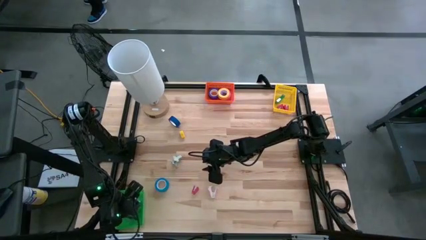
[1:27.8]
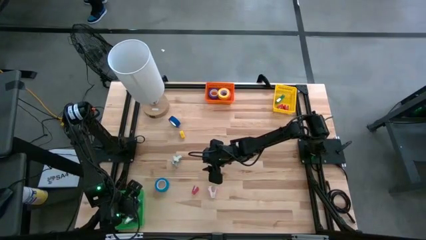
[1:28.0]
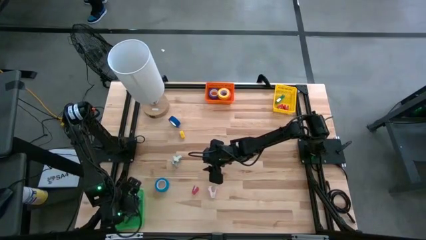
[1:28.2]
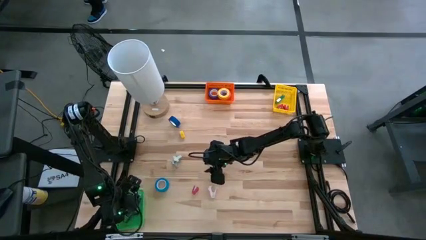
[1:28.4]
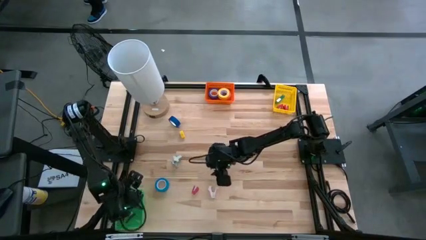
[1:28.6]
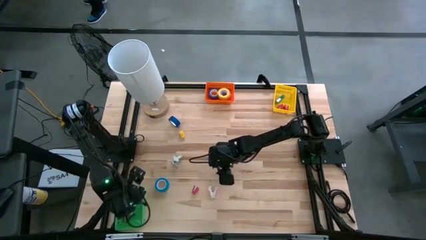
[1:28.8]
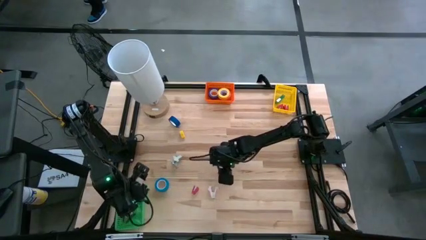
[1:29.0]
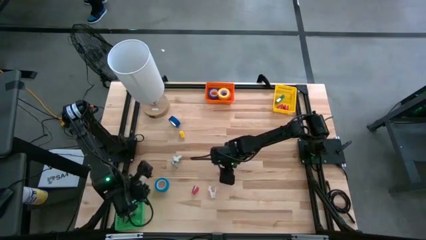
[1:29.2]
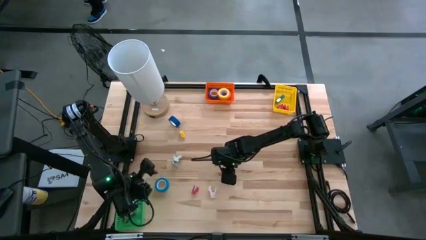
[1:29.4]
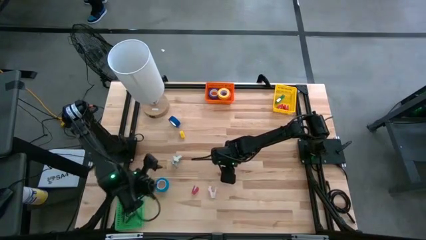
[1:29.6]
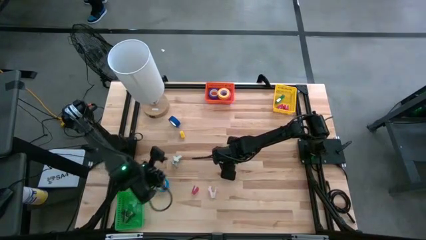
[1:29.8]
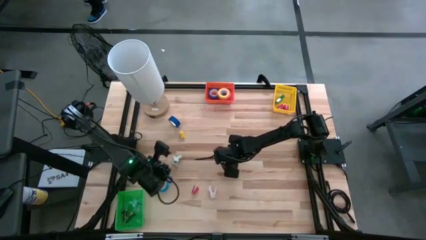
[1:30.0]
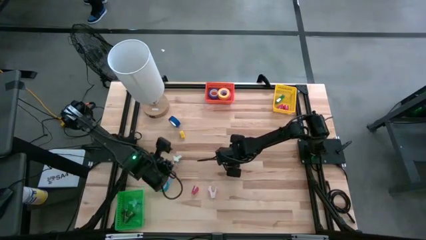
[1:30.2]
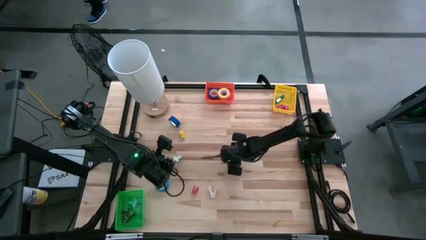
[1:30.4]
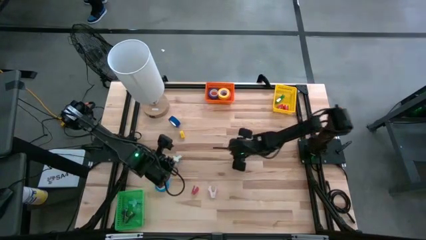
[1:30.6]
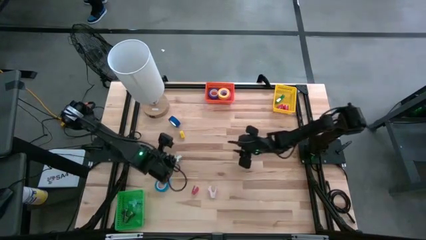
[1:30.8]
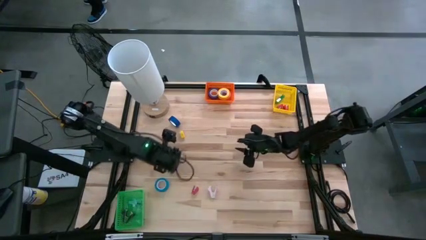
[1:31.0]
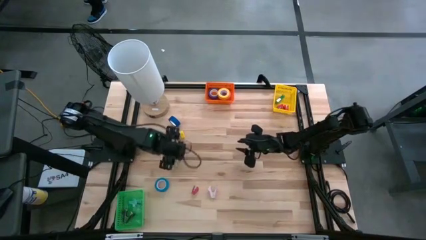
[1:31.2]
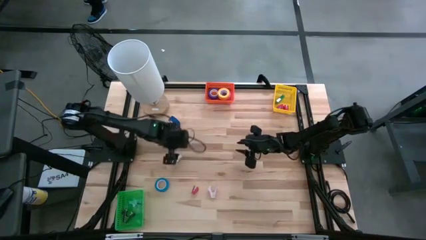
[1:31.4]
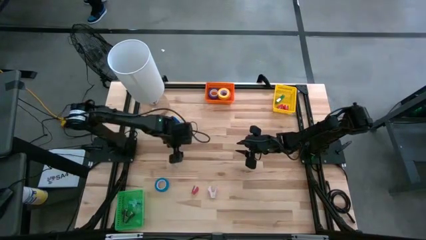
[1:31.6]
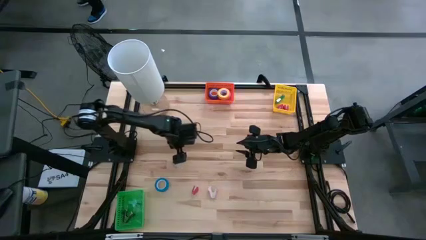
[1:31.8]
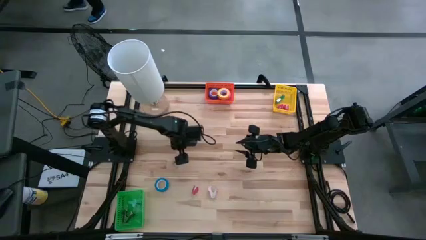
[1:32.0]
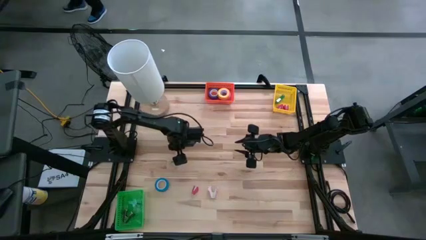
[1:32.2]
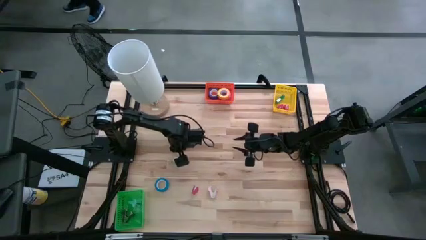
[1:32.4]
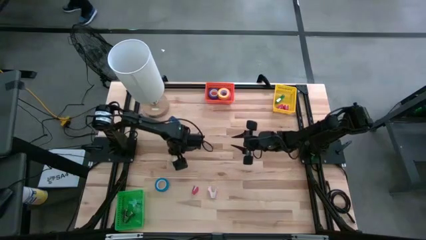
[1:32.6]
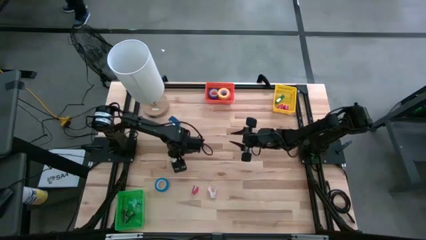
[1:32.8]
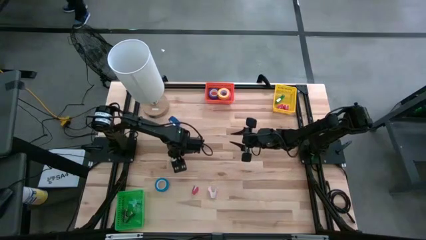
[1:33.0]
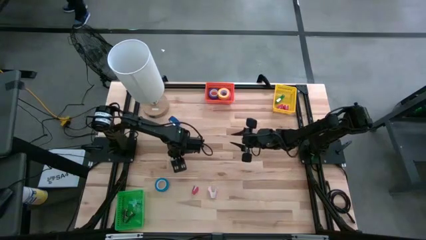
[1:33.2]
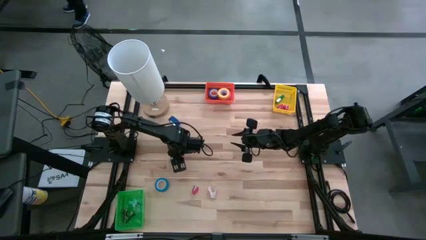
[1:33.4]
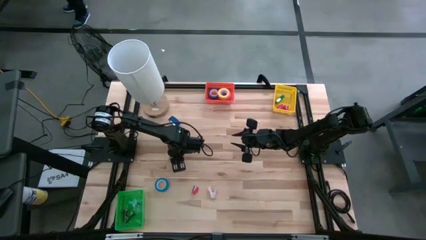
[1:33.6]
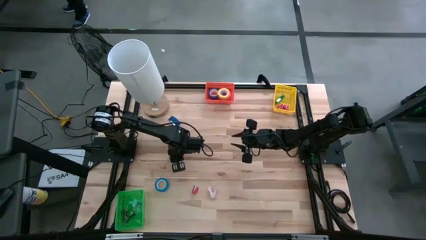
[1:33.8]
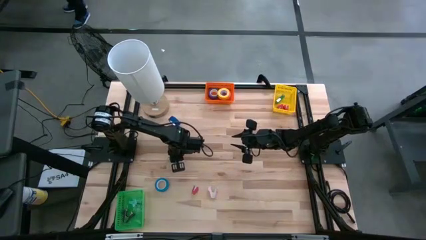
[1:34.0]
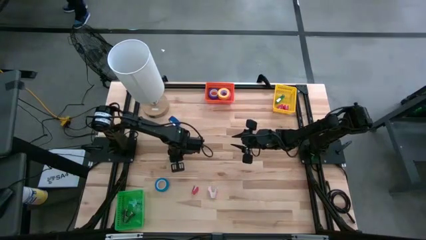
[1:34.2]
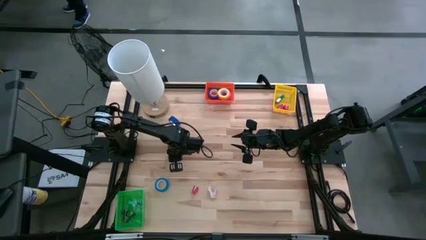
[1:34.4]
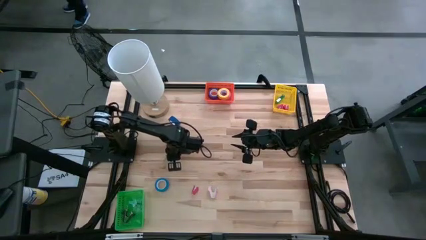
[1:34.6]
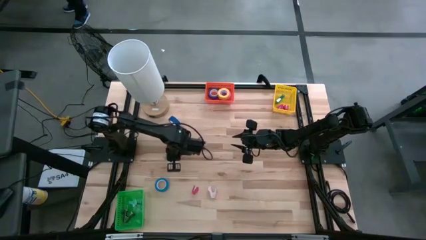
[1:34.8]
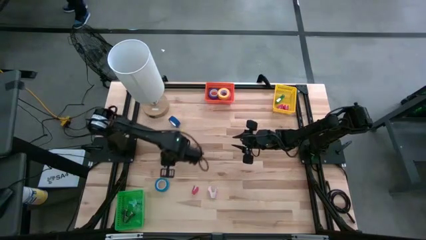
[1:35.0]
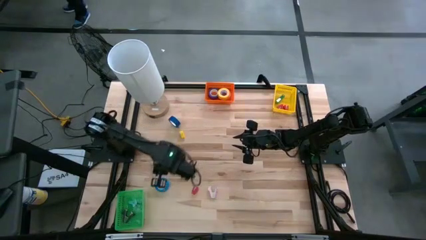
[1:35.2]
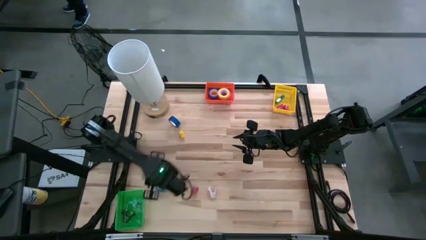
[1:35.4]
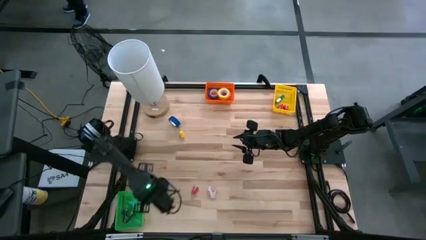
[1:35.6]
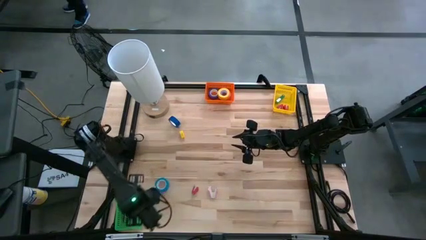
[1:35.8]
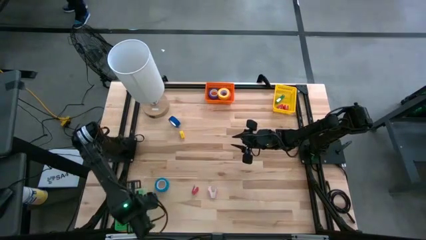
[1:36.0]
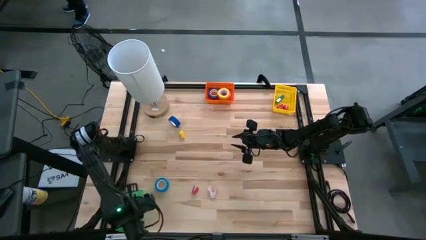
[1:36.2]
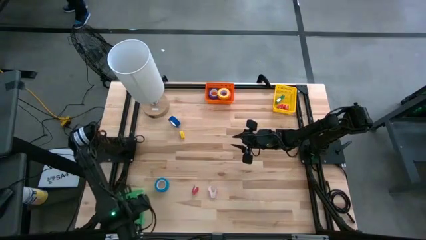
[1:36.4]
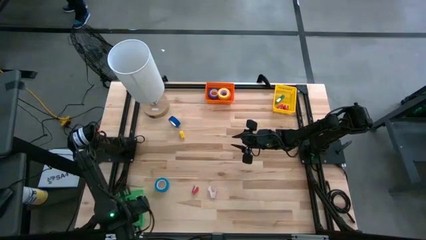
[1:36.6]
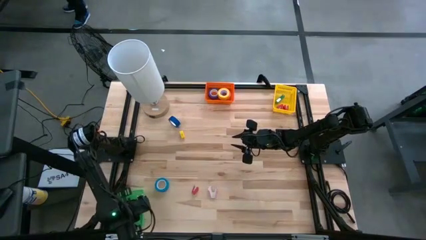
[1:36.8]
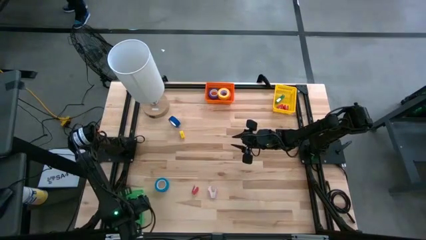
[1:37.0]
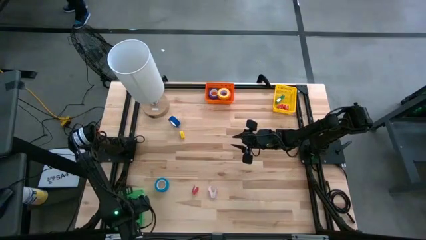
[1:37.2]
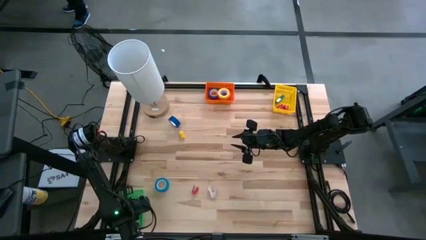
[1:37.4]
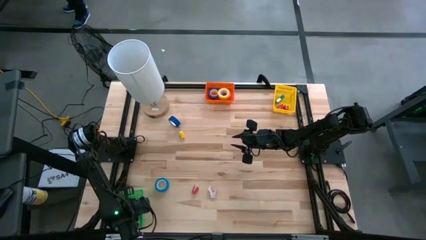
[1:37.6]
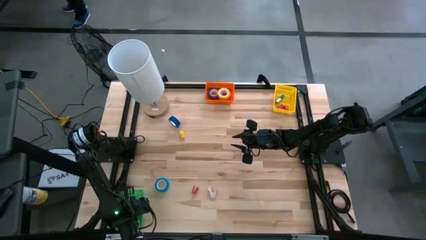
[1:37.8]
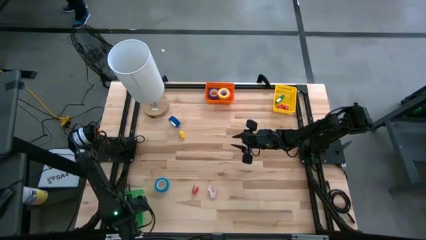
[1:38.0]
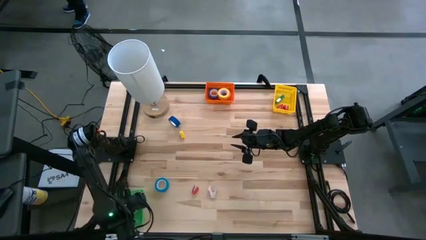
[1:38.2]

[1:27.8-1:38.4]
Task: Pick and place Stapler, Stapler remover, tape
Put the white staple remover into the green bin

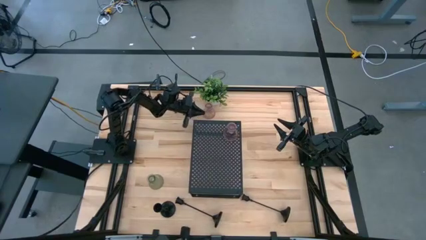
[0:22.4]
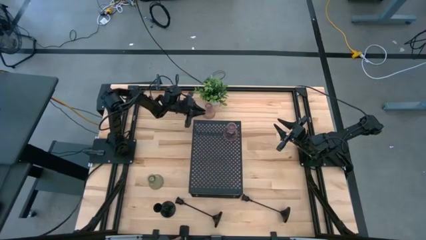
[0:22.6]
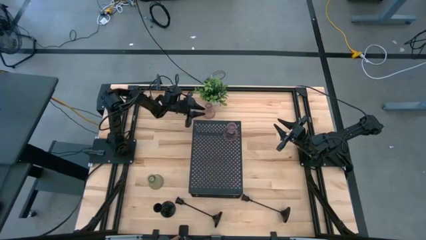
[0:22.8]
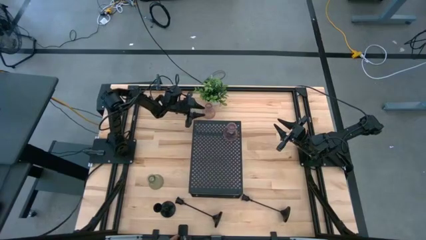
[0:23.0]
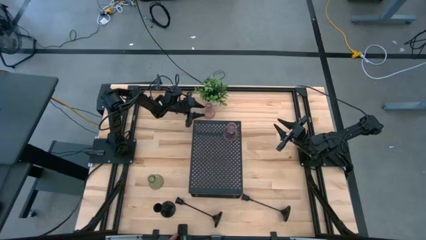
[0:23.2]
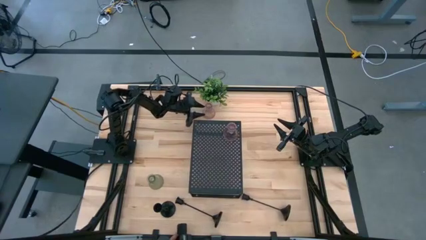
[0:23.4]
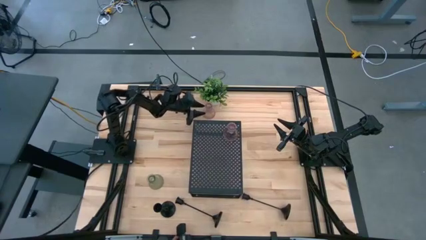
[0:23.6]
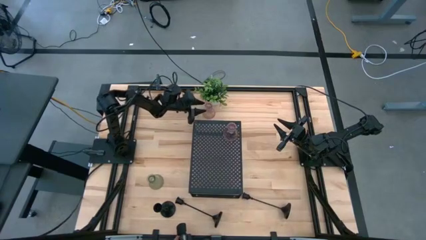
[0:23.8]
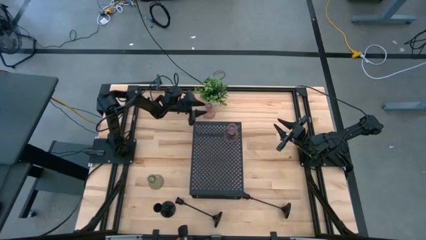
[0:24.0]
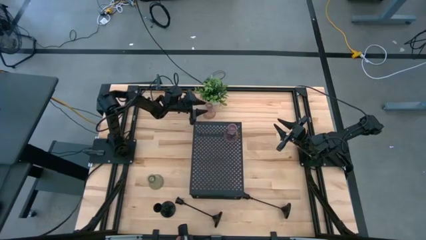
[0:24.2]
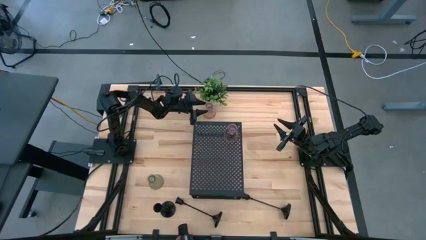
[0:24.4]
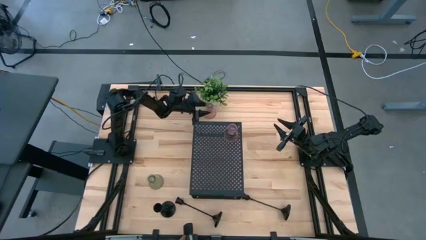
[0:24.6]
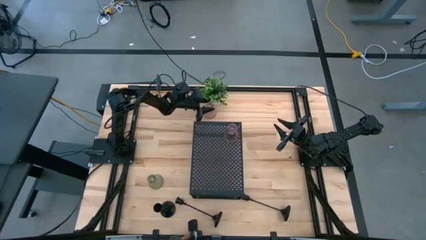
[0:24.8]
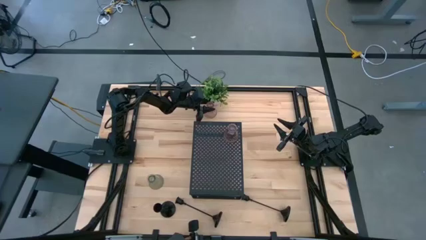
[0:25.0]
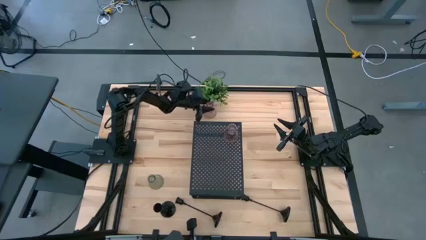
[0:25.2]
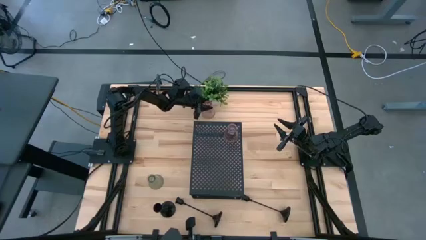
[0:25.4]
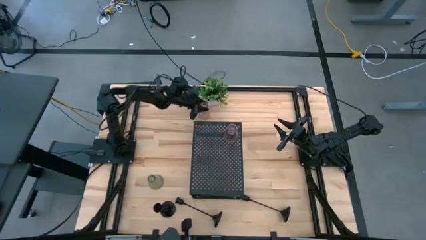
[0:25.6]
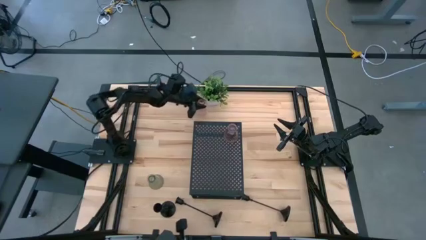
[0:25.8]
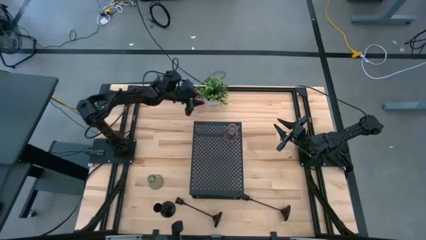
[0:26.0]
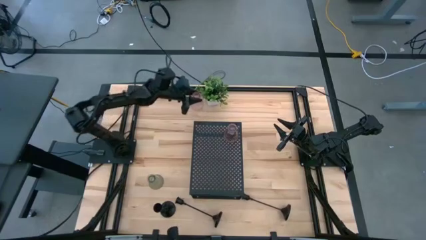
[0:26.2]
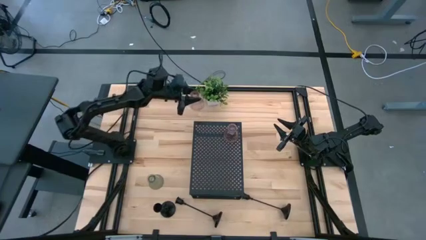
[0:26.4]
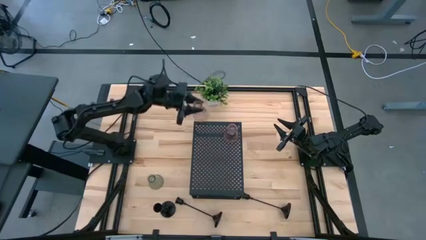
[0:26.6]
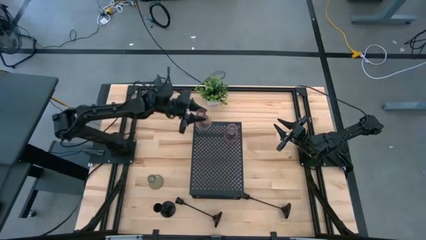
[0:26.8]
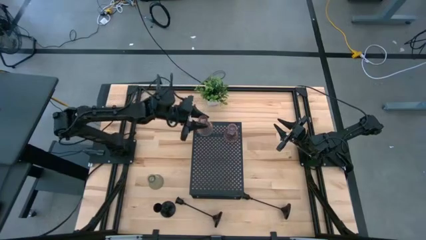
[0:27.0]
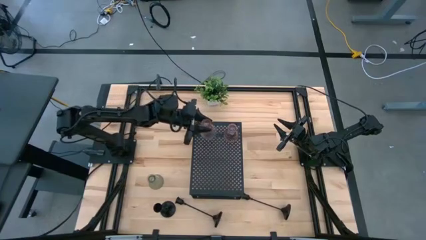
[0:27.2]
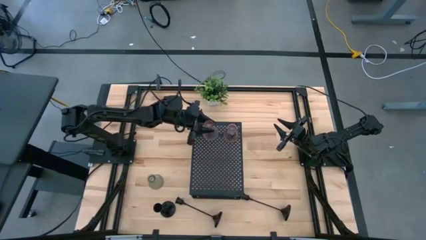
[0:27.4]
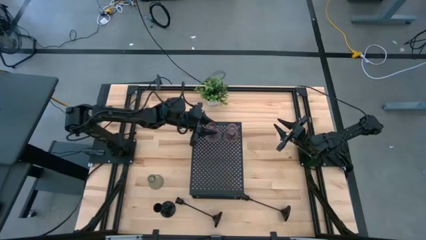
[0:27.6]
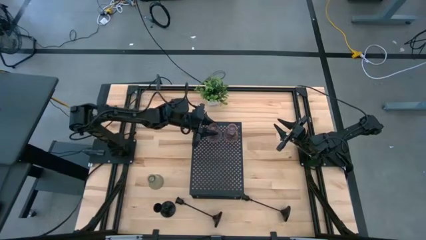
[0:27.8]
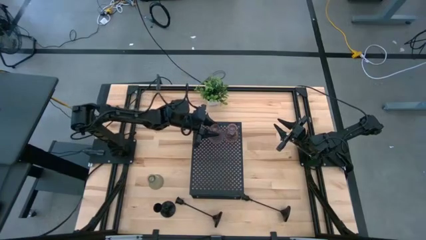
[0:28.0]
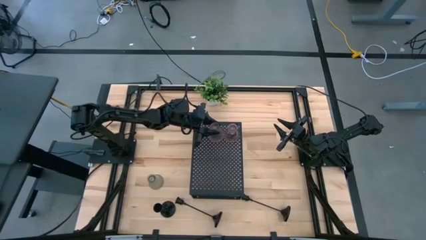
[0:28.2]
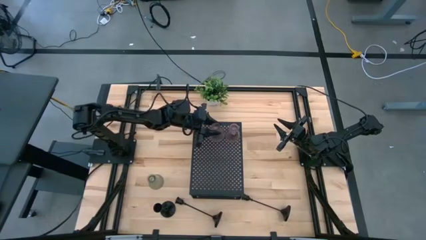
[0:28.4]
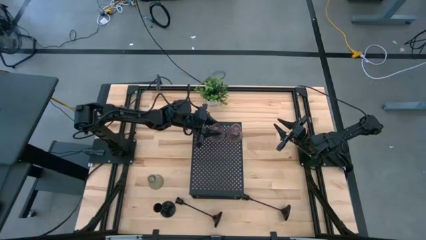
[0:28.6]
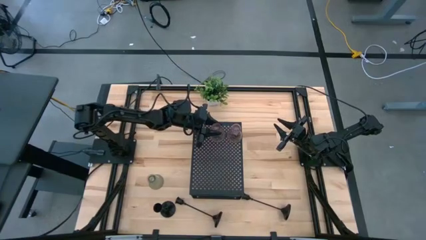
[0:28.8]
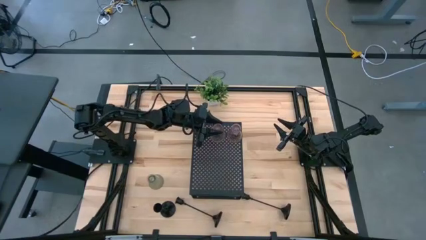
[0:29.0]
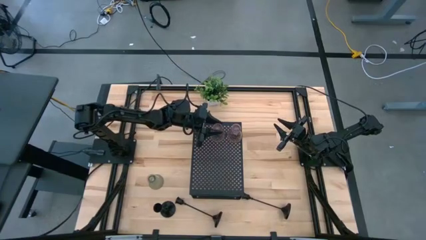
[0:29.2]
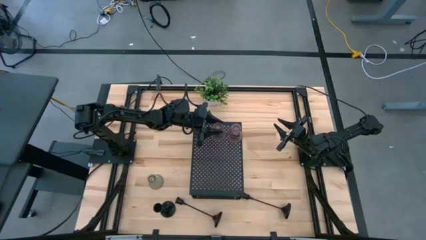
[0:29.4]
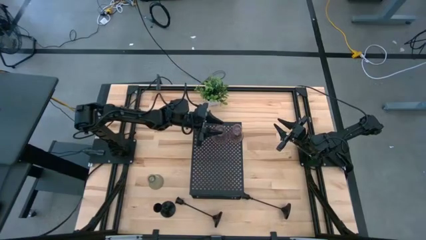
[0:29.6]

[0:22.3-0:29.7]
Task: Pick & Place candle stick holders
Align the purple glass candle holder with the purple glass candle holder on the shelf
